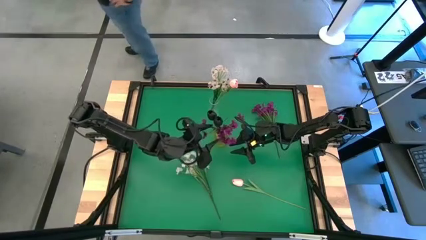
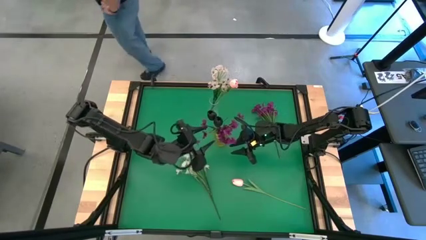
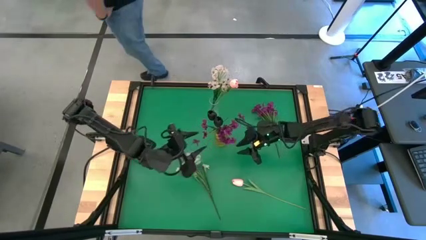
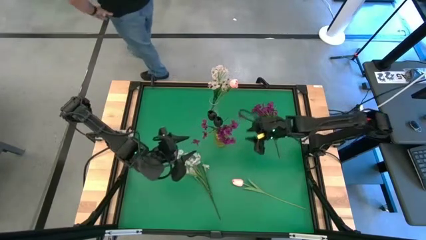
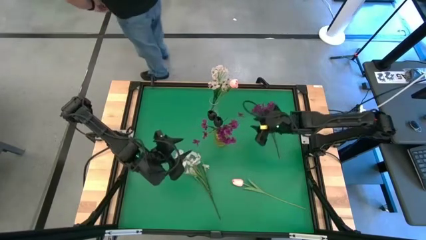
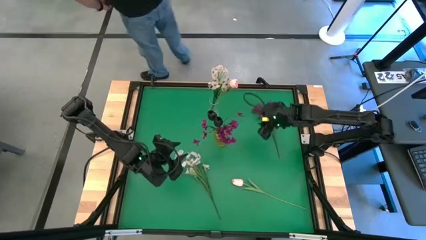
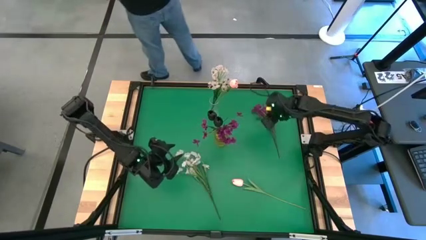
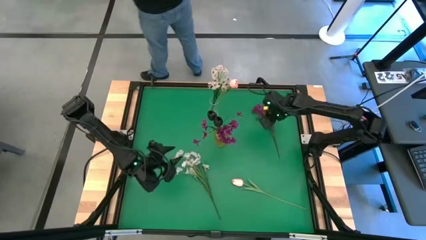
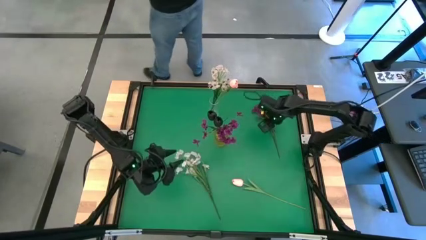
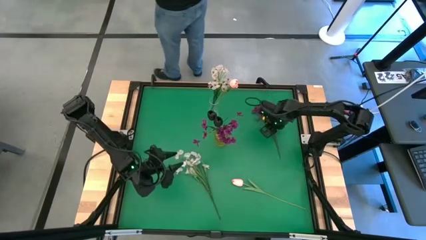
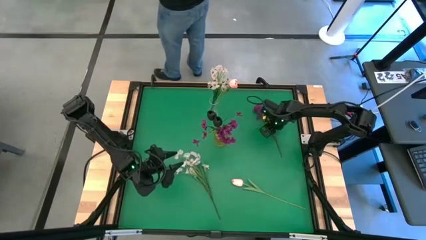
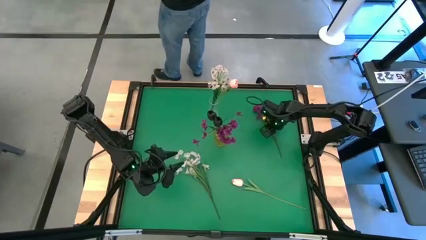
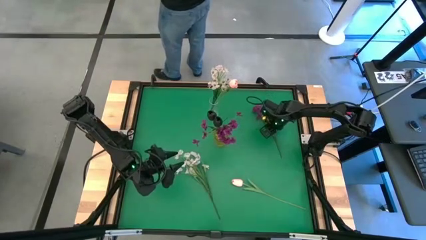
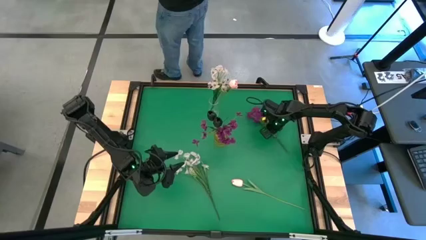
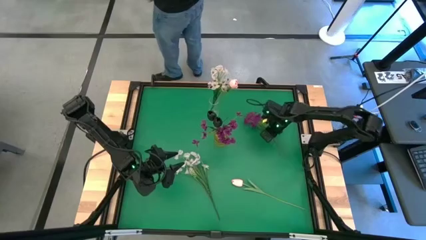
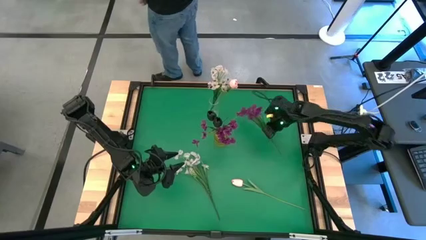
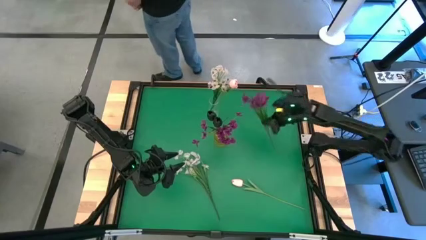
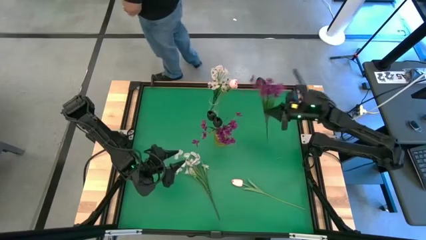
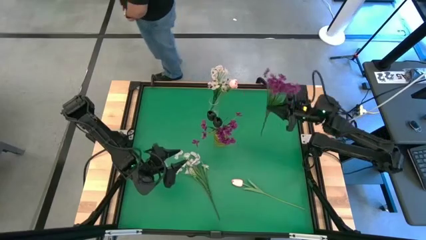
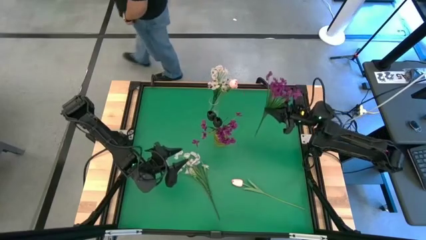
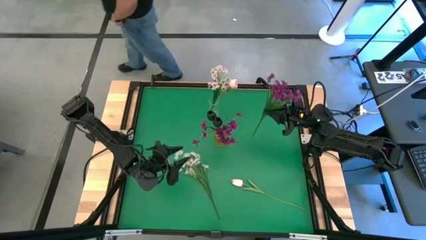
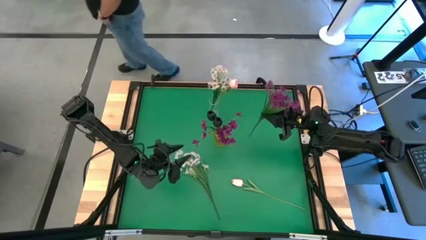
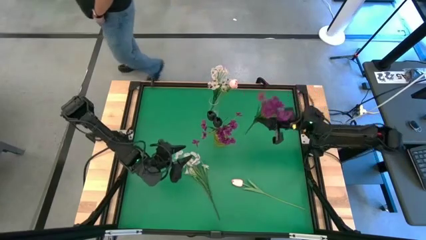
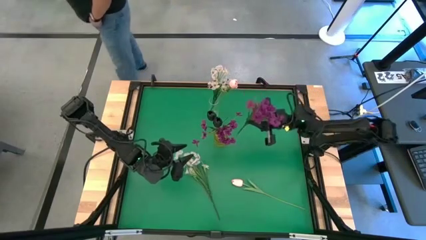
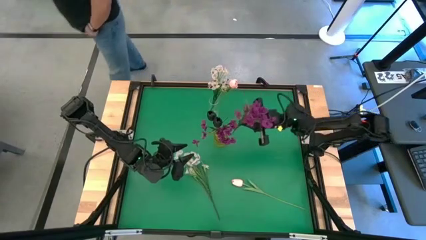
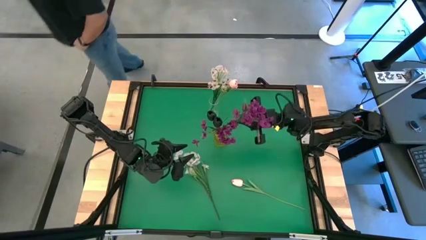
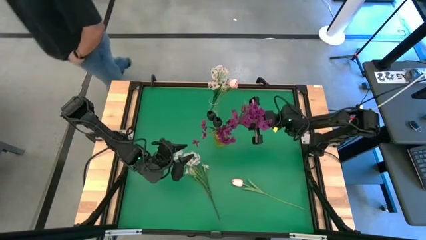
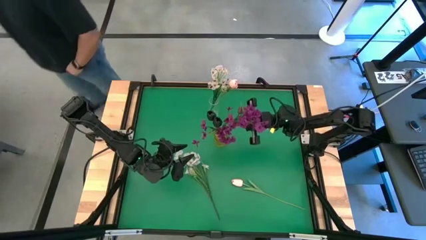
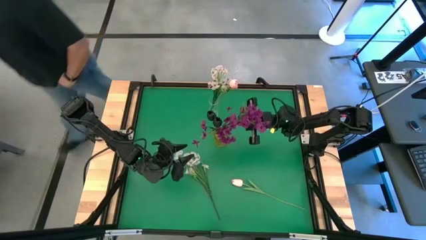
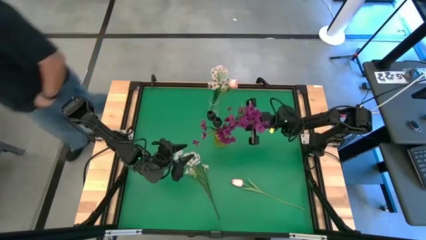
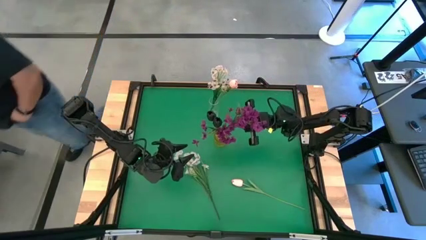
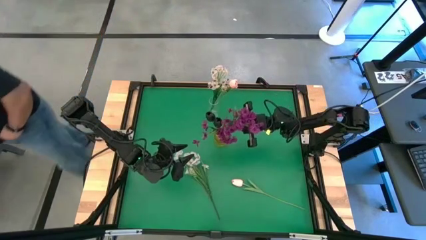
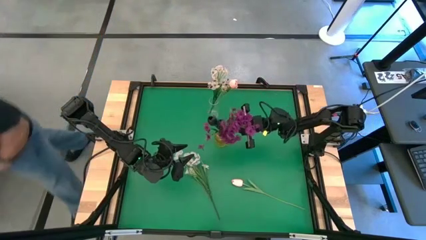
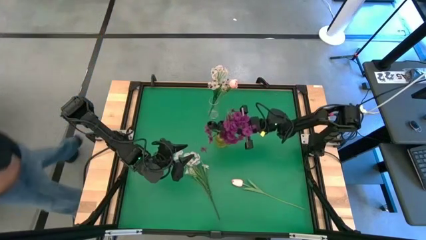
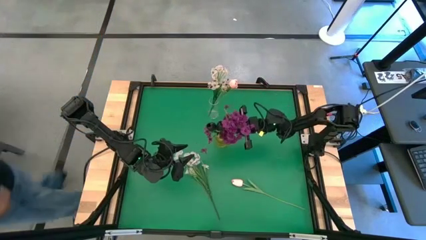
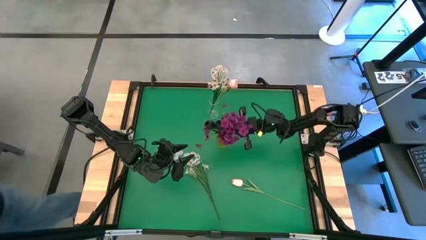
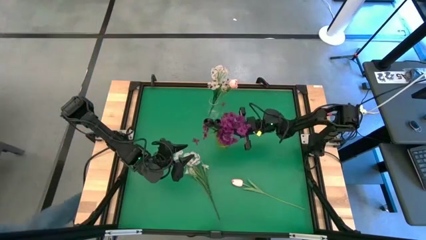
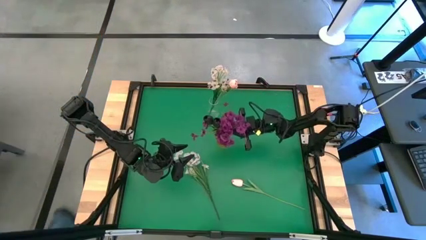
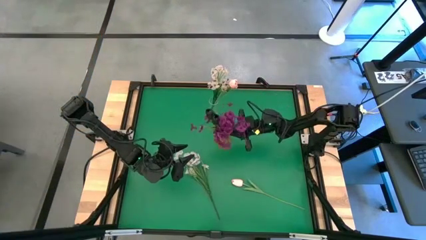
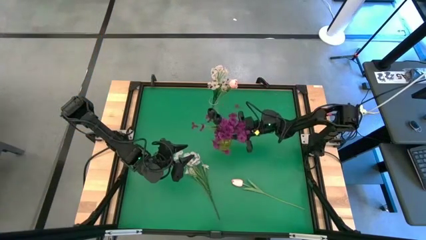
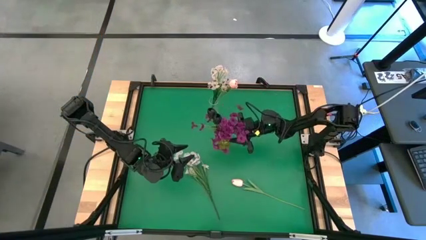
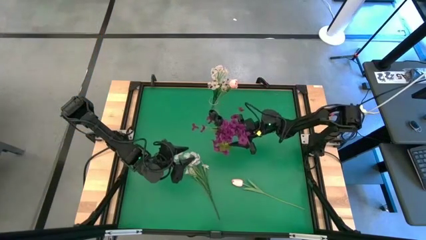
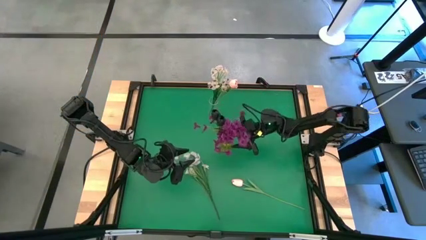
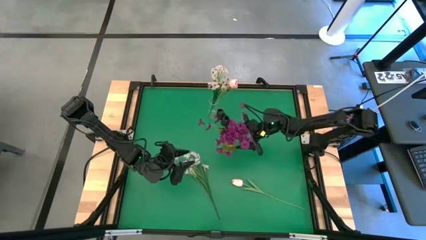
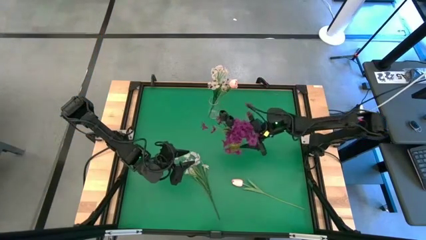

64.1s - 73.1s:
Task: Sort flowers into vase by color
Put the purple flowers into the yellow vase

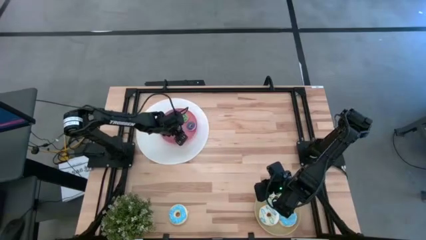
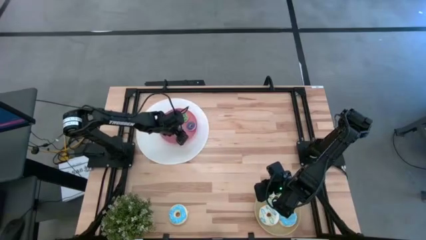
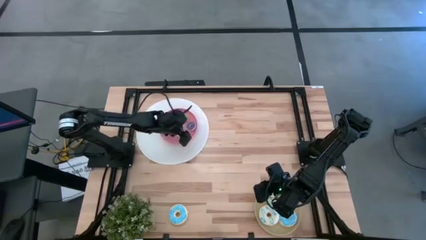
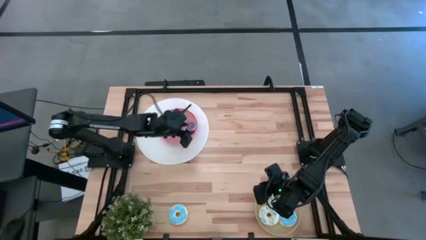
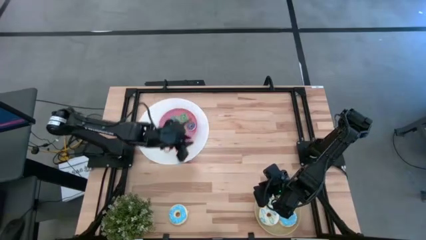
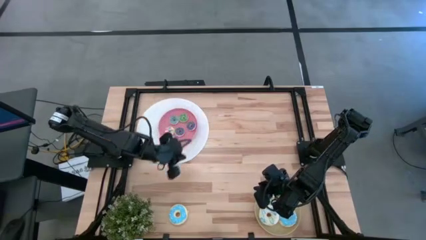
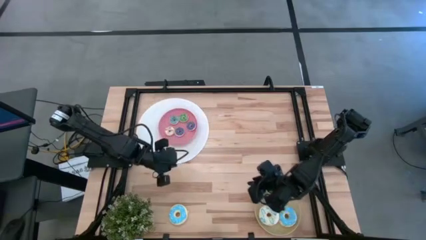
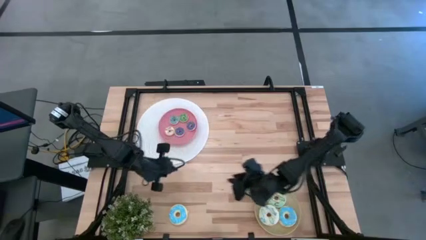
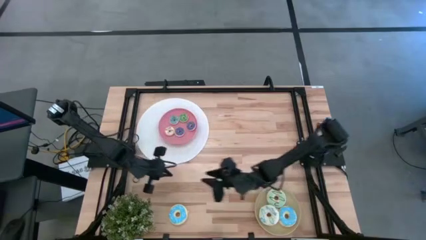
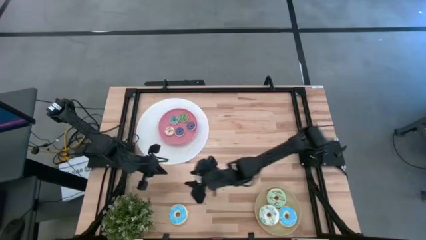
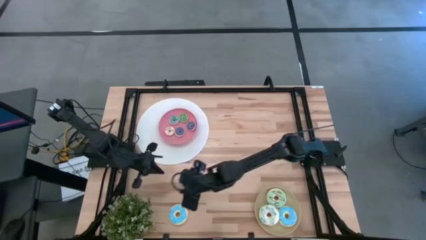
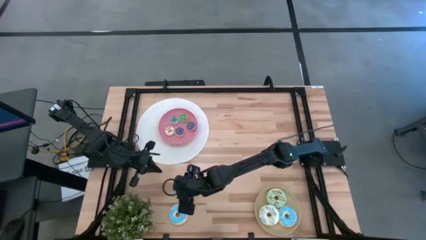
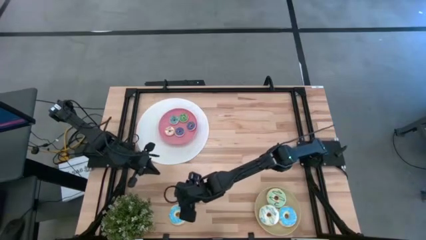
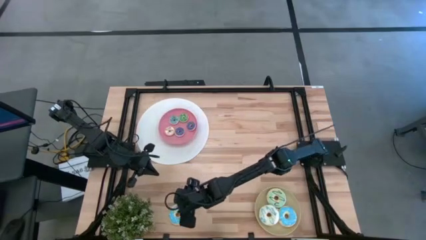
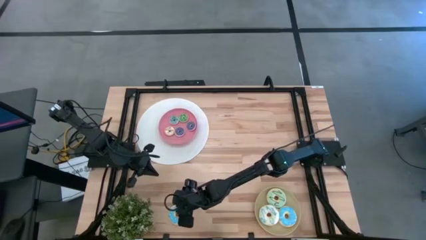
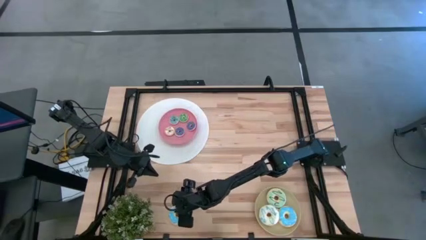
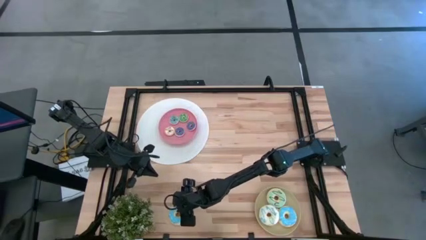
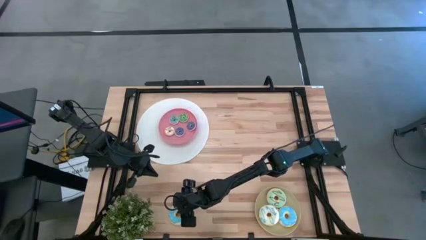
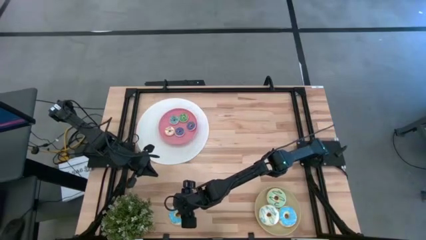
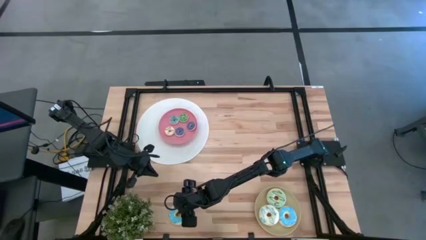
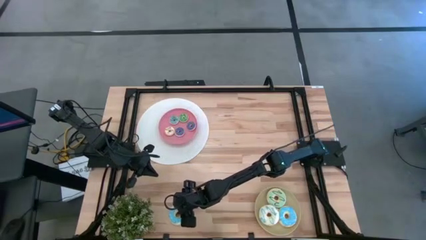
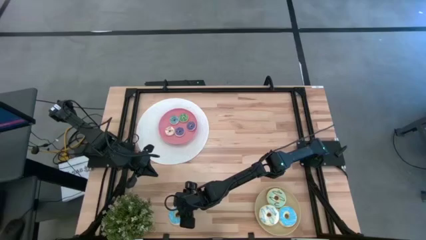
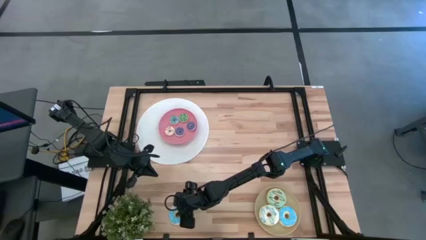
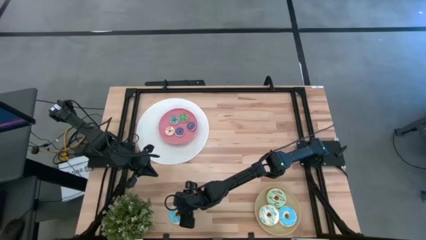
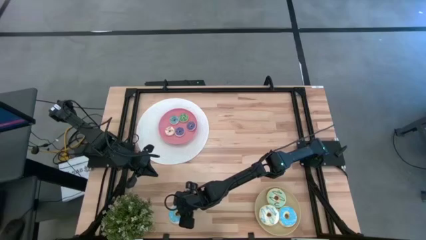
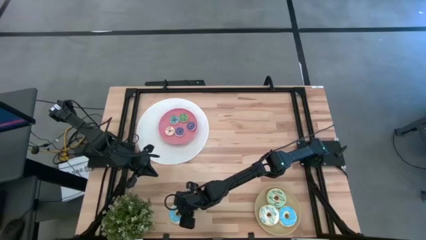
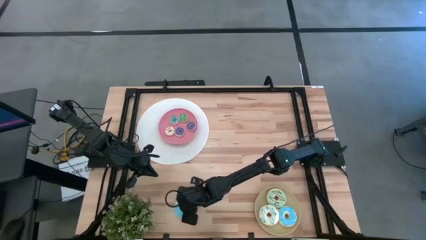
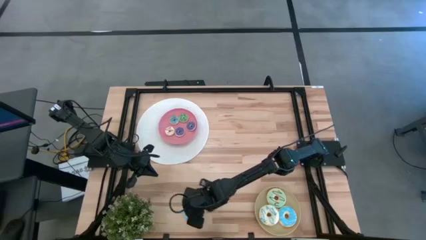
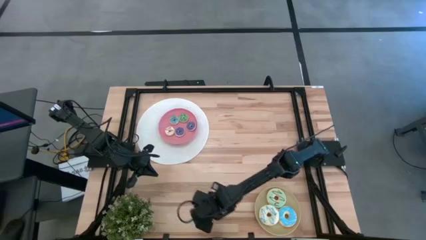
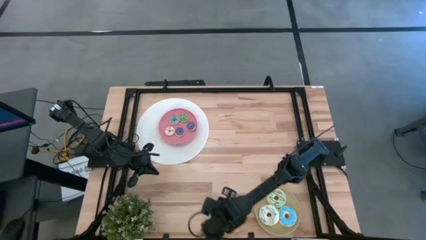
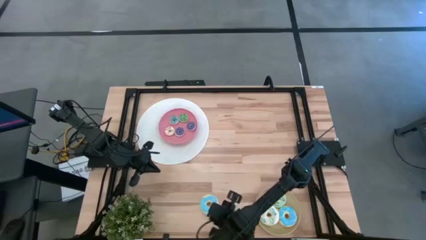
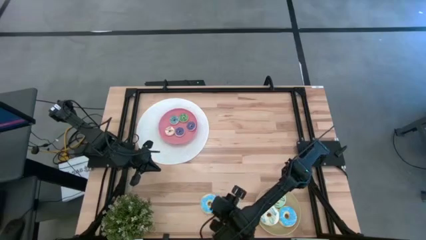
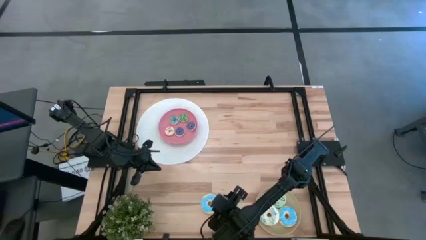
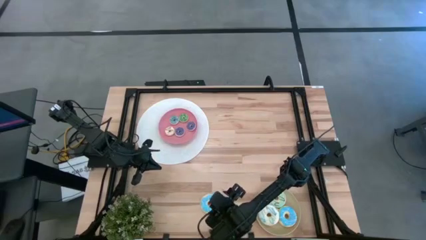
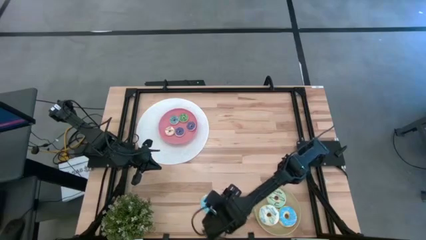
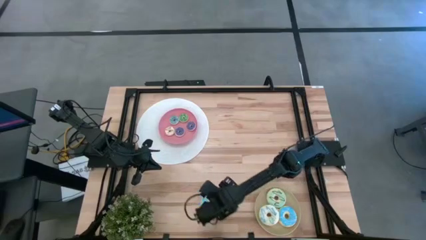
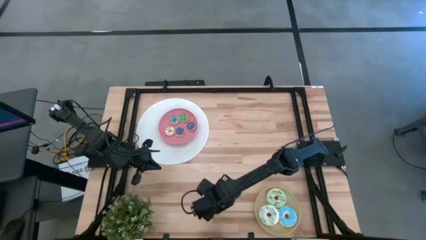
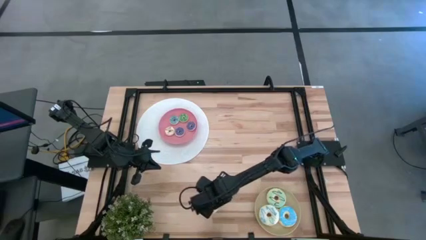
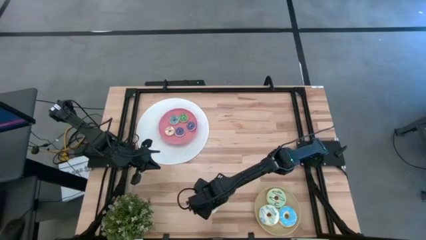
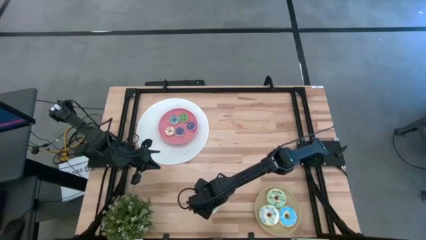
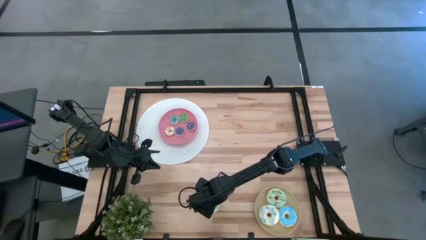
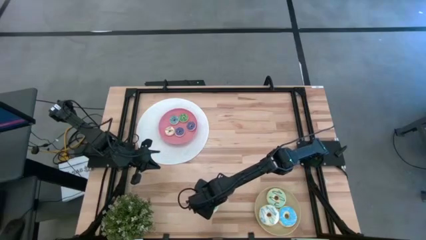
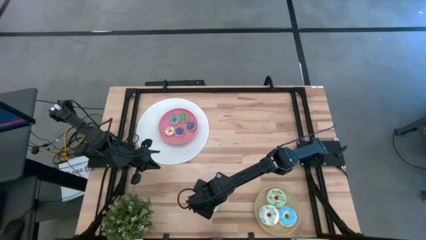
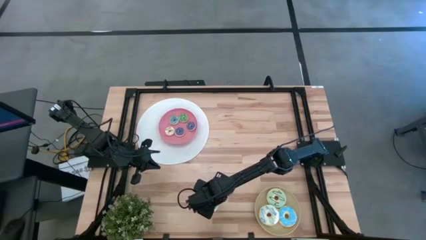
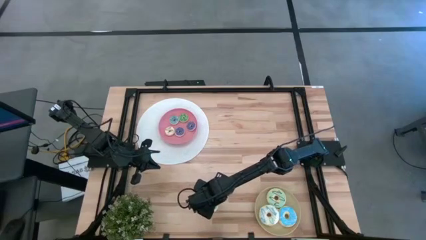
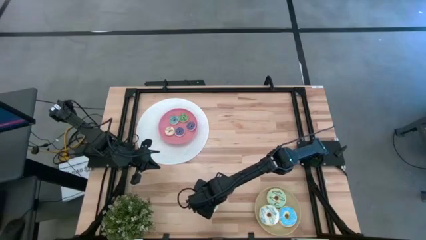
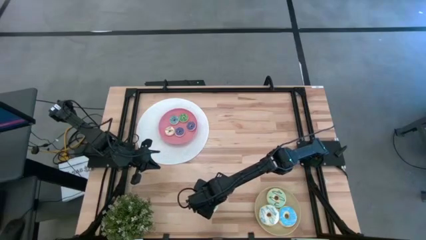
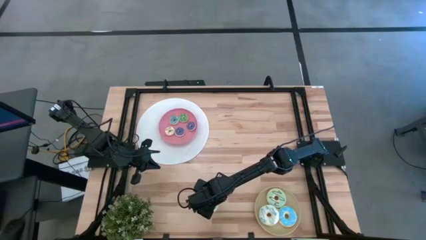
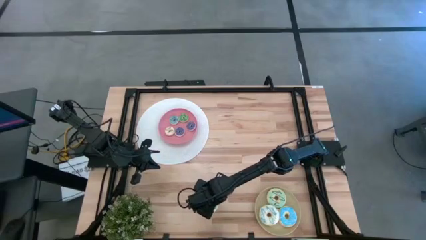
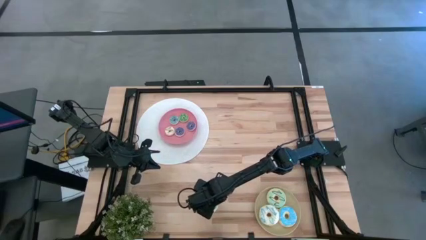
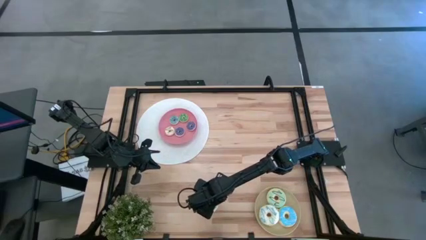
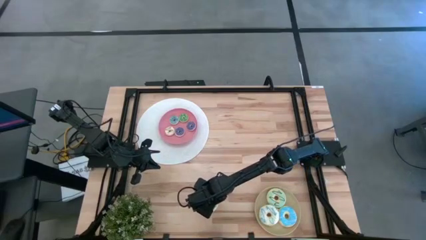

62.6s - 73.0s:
Task: Pick & Place donuts
Put the large blue donut on the brown plate
